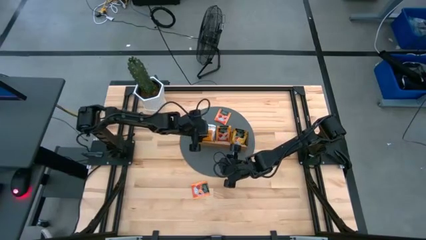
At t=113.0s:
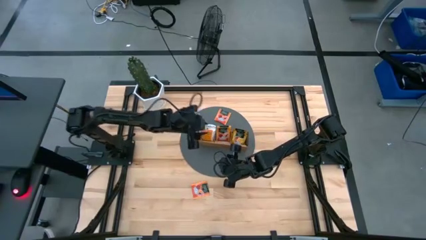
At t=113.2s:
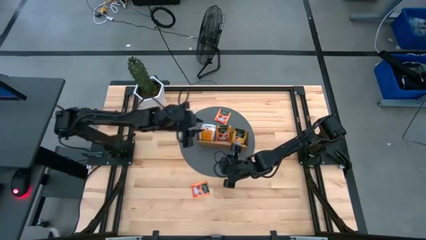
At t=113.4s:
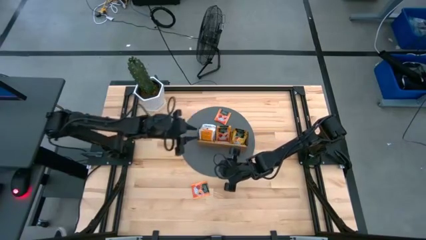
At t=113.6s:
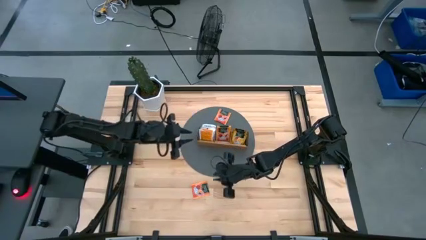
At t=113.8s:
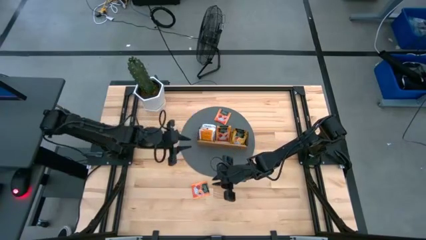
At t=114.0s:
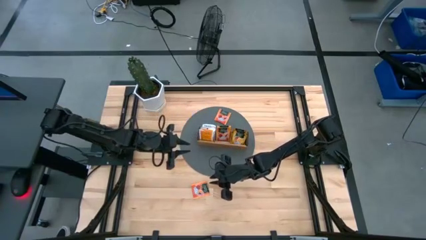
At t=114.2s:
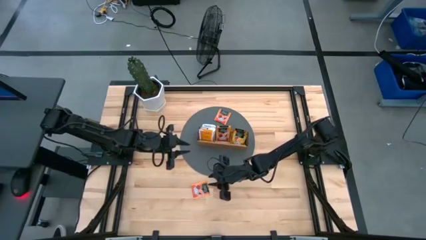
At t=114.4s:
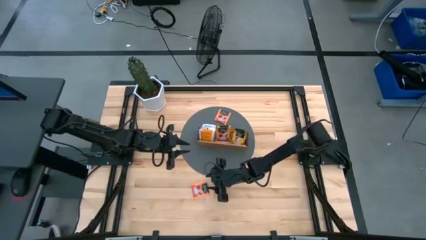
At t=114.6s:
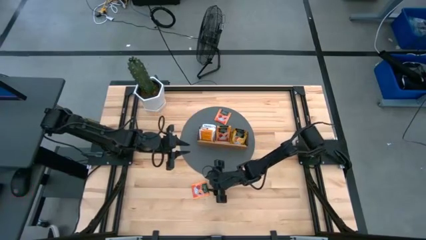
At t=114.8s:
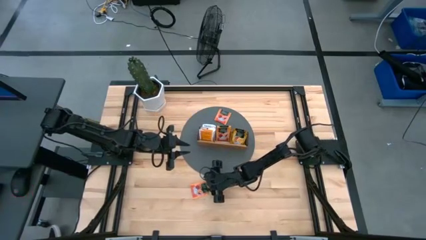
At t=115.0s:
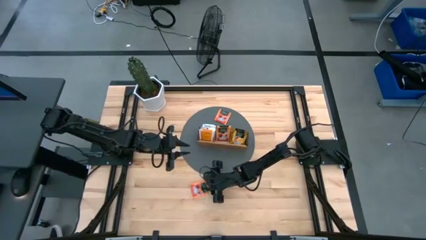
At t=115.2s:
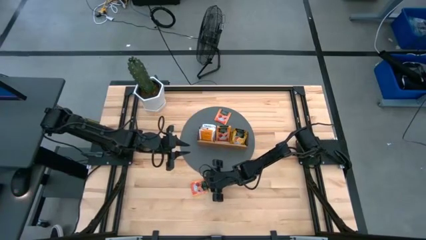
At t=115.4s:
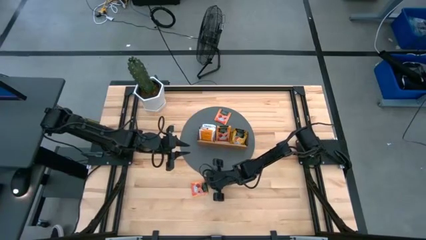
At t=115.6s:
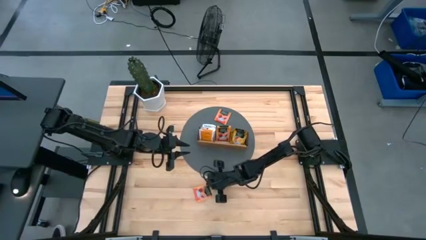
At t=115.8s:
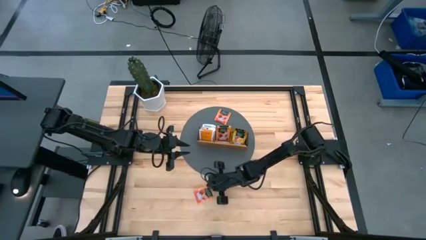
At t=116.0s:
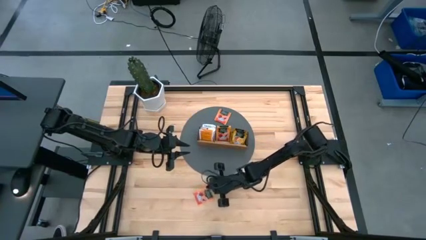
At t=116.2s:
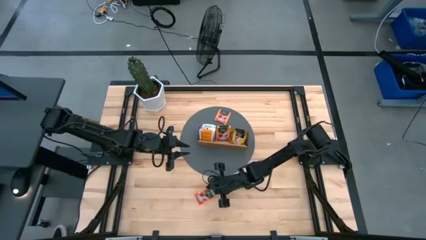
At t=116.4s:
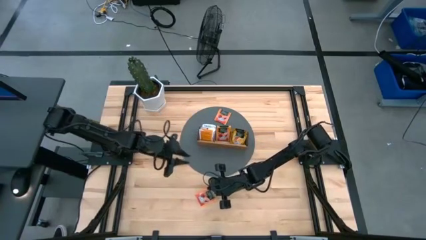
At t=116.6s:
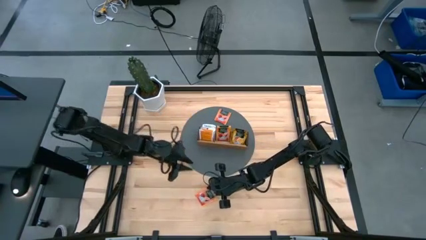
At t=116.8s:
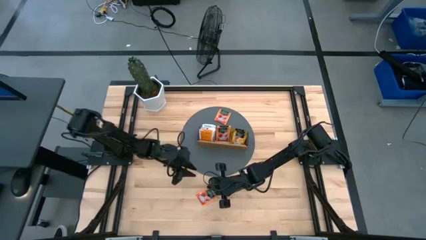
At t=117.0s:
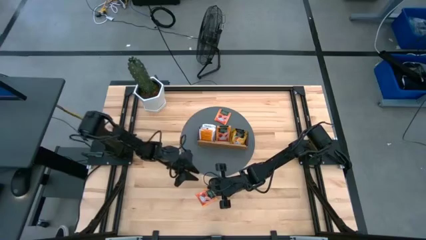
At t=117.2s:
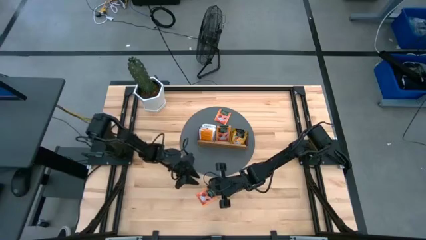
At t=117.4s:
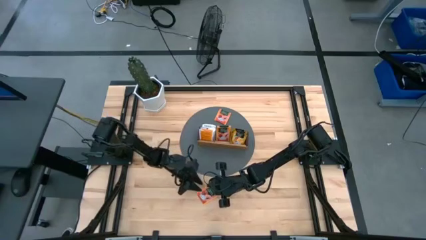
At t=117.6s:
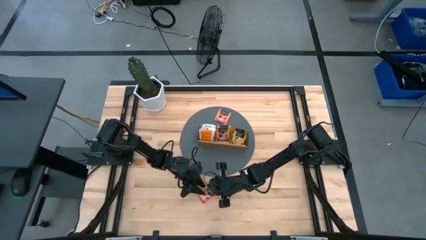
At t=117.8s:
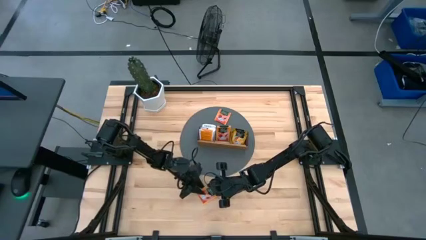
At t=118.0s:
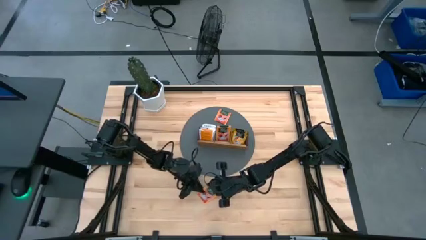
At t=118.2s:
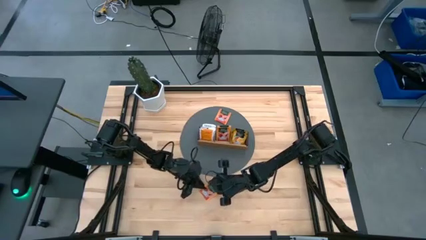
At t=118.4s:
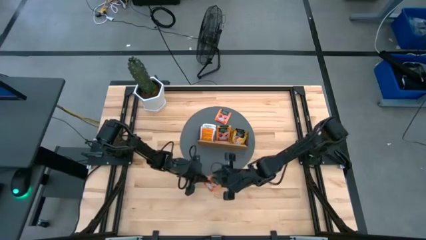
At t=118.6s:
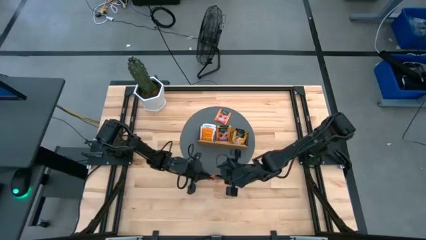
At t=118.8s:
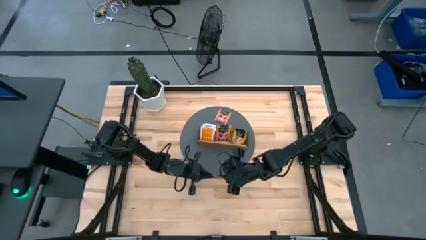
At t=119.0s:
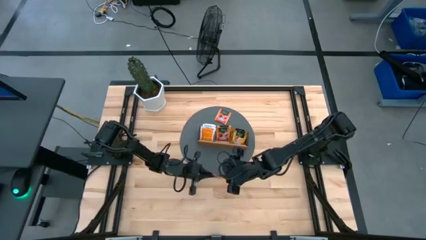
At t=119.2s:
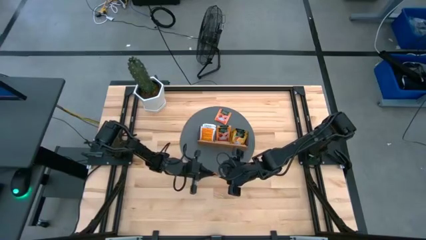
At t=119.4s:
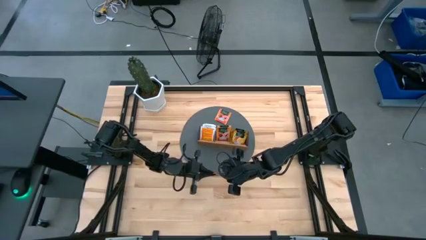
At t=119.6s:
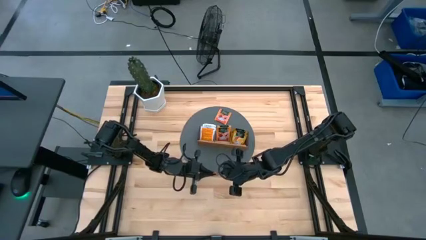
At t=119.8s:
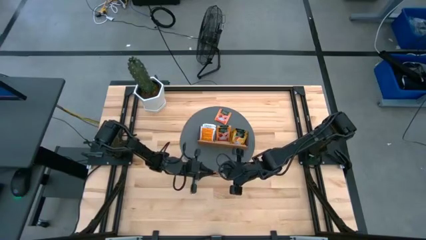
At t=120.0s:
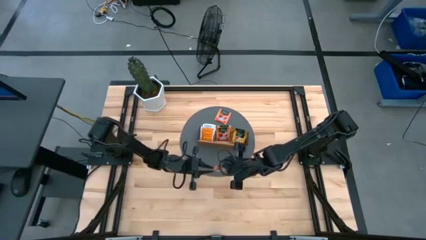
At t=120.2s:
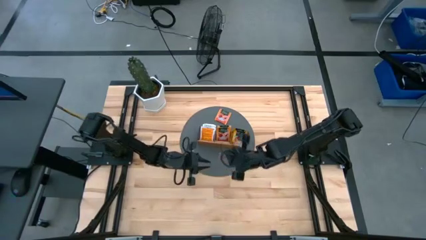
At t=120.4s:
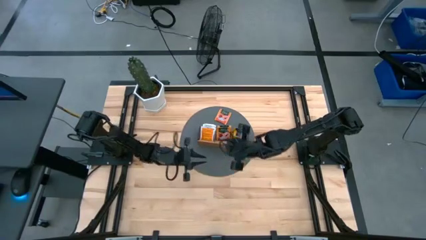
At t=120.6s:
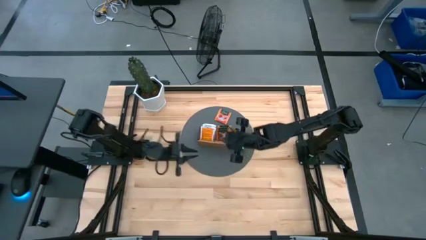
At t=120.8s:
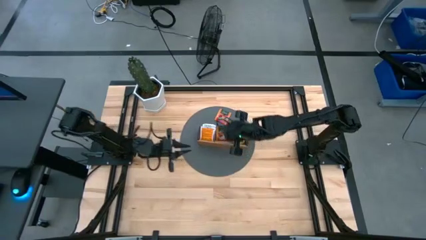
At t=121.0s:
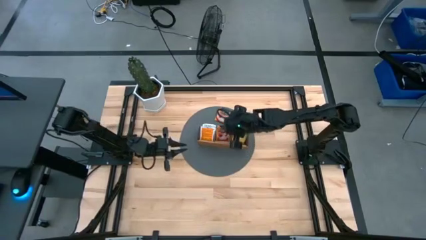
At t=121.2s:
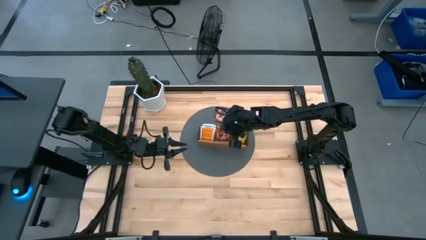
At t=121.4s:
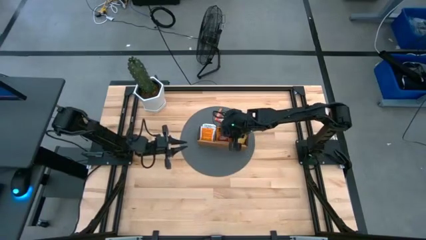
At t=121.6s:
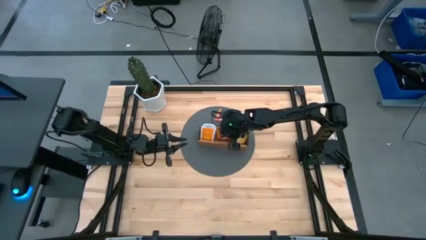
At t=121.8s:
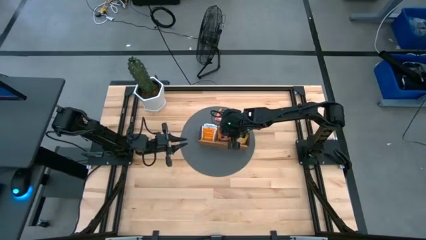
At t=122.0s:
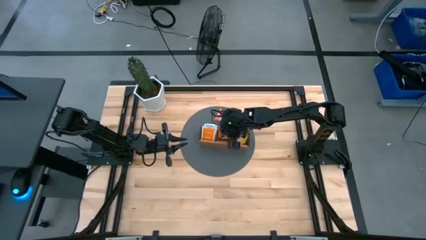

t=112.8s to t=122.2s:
Task: Pick & Place Tea
Put the orange tea bag into the middle section of the wooden organizer

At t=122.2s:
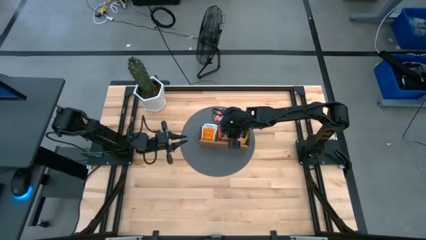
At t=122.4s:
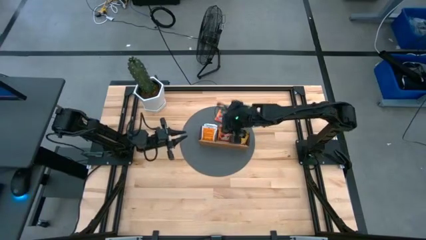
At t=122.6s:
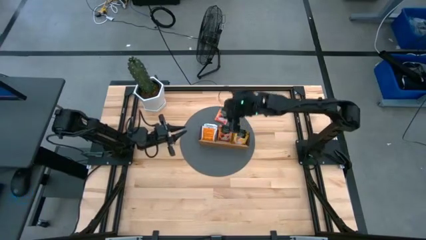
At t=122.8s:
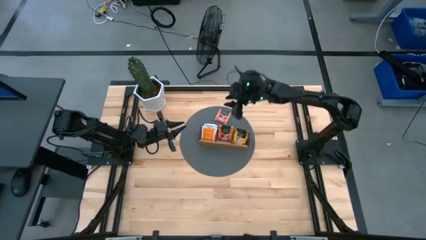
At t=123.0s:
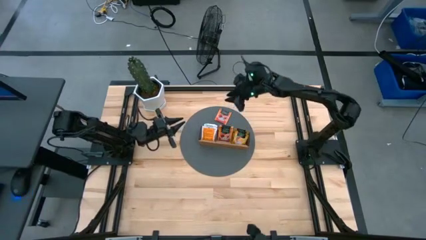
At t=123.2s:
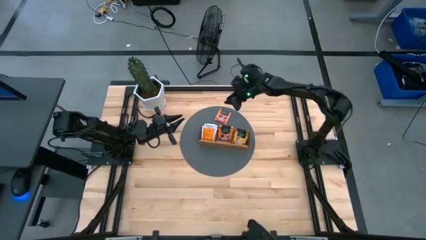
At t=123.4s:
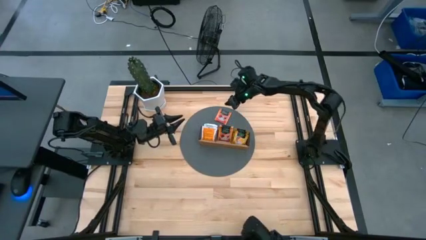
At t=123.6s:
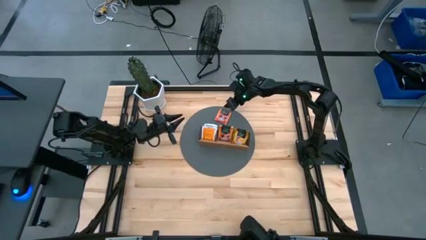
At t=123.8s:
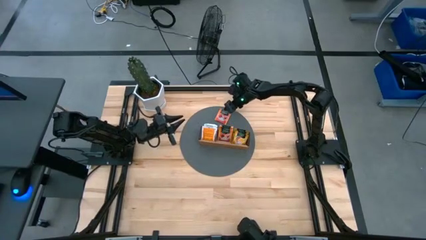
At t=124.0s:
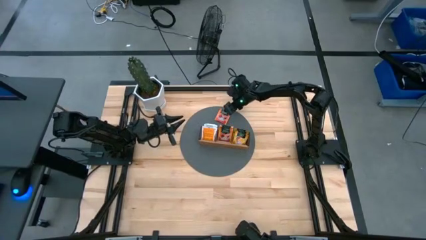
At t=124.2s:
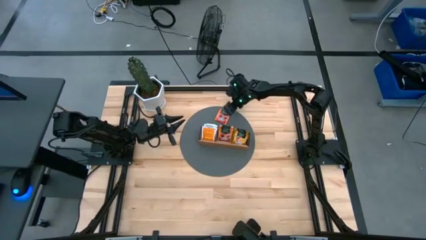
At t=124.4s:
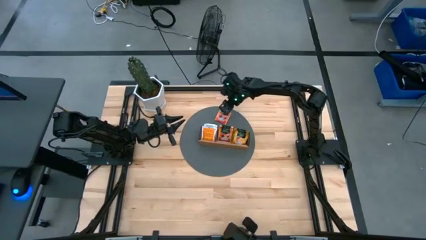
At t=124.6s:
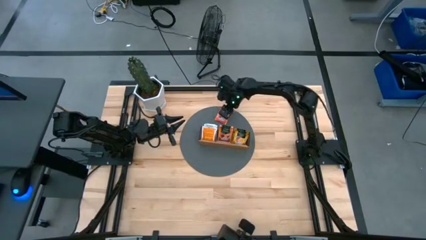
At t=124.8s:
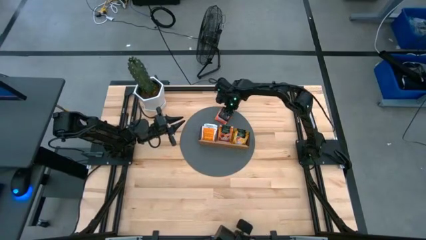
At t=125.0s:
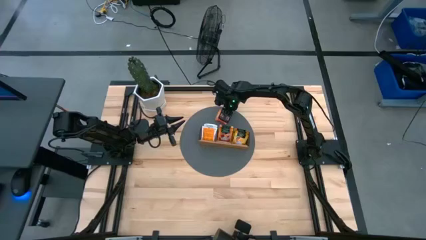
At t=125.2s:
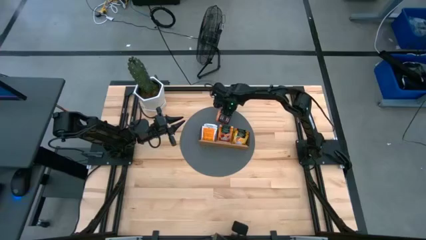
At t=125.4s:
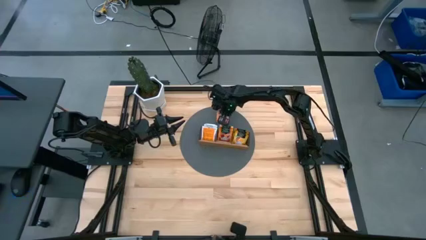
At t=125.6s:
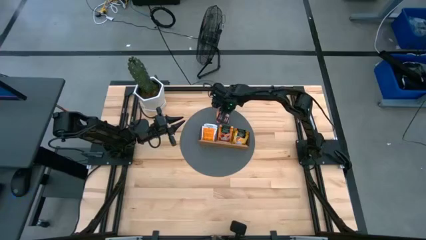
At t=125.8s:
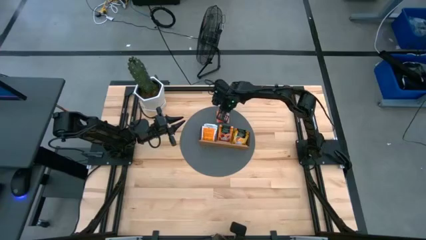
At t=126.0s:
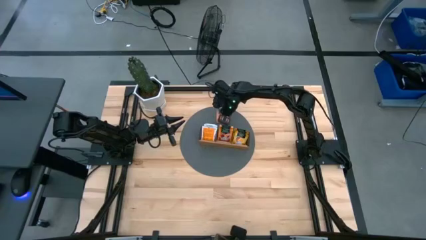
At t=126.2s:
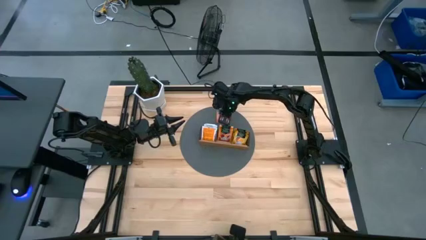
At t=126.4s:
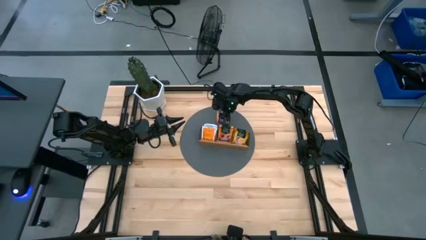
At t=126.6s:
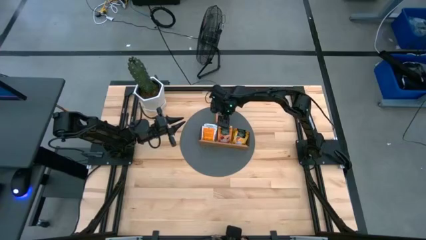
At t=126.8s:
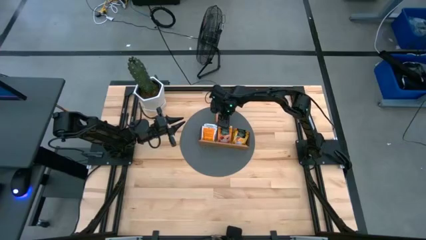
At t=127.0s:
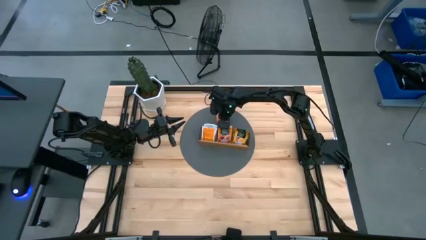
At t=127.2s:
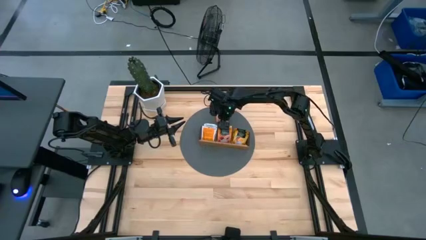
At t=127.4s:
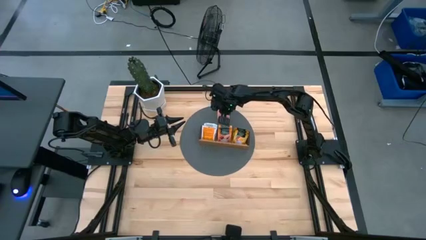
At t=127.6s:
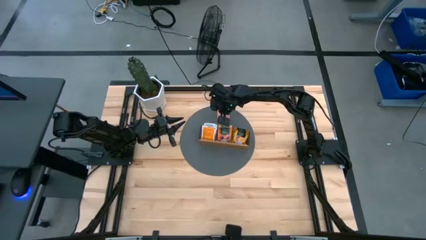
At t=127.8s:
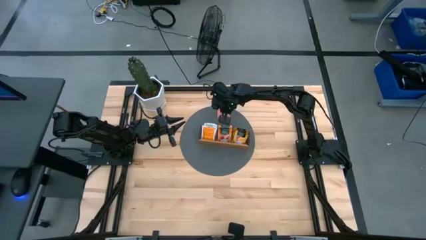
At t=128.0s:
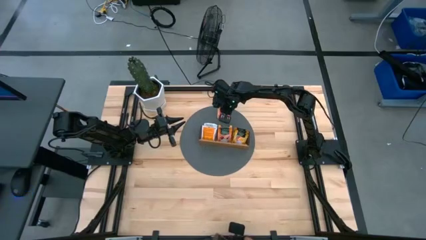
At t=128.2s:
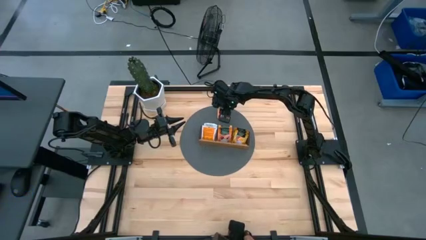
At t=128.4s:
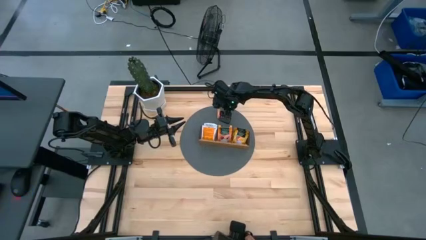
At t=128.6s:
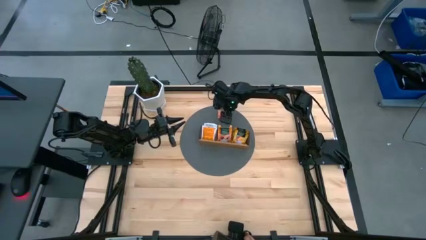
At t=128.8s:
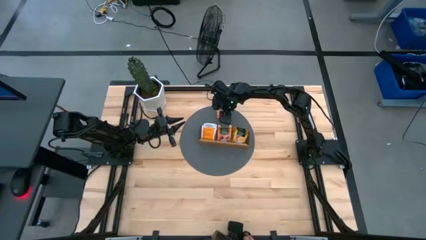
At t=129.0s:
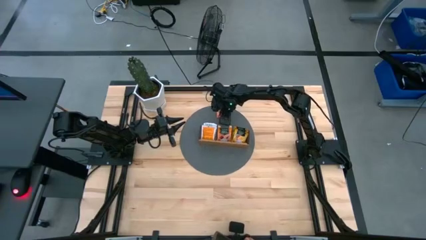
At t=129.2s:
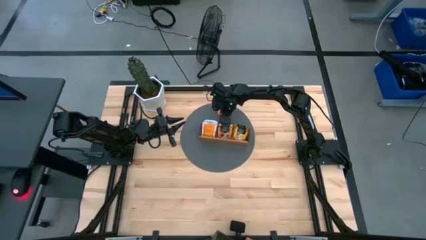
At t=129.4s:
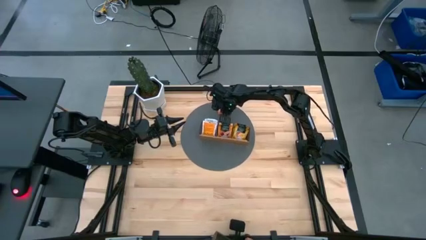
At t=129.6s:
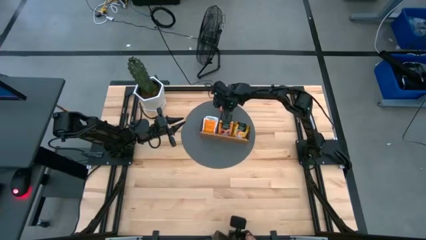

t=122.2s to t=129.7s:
Put the orange tea bag into the middle section of the wooden organizer
